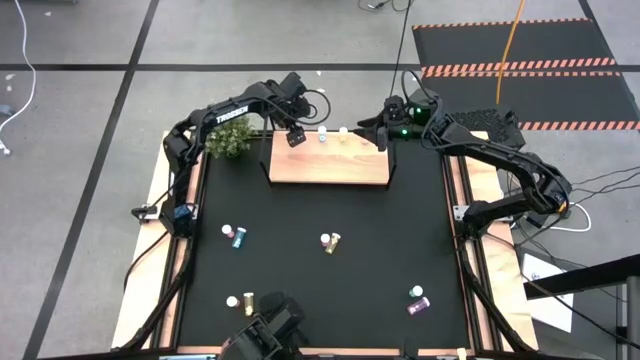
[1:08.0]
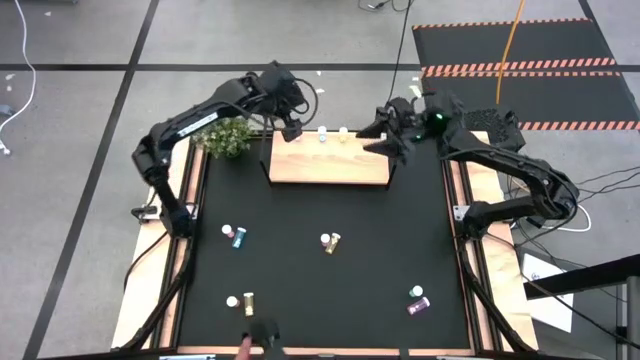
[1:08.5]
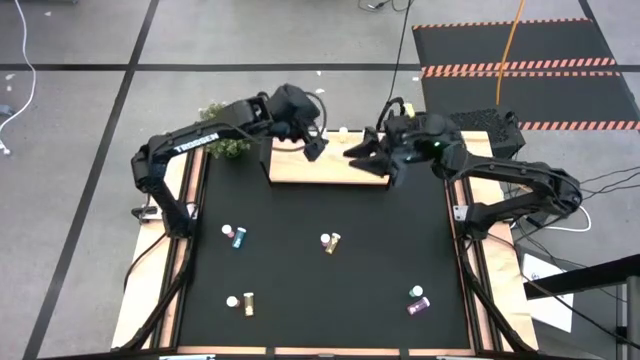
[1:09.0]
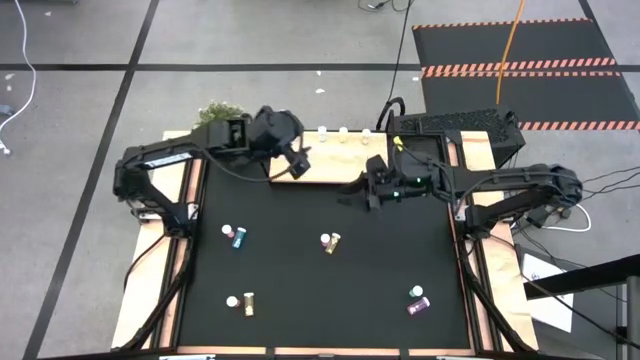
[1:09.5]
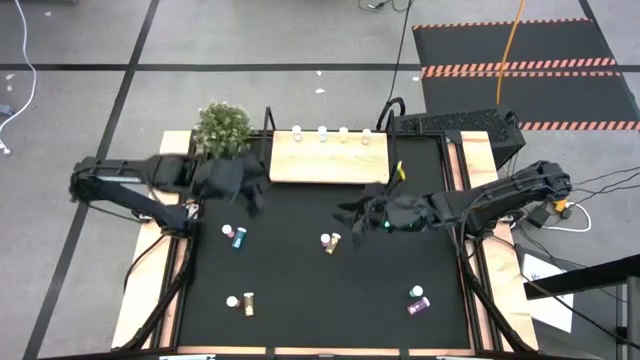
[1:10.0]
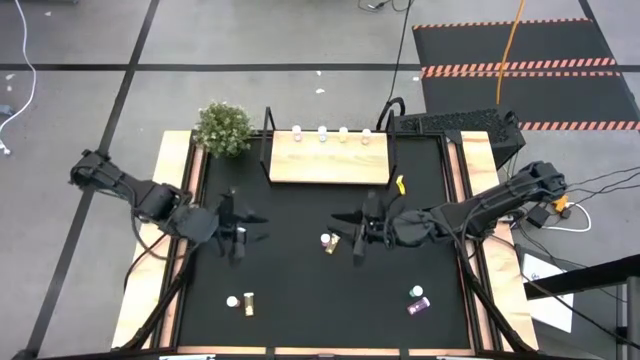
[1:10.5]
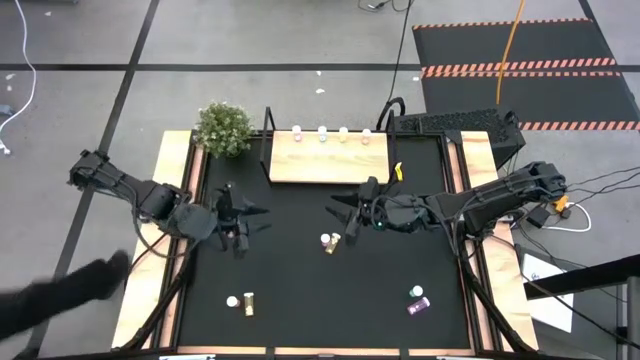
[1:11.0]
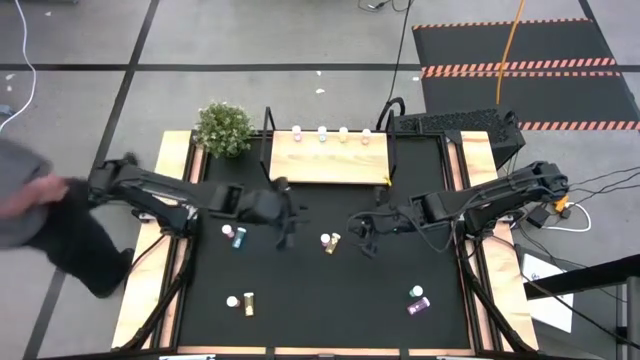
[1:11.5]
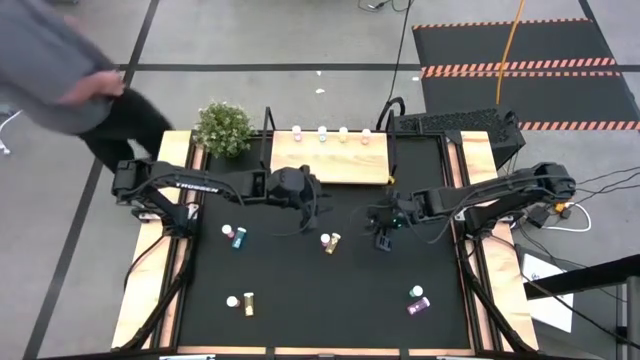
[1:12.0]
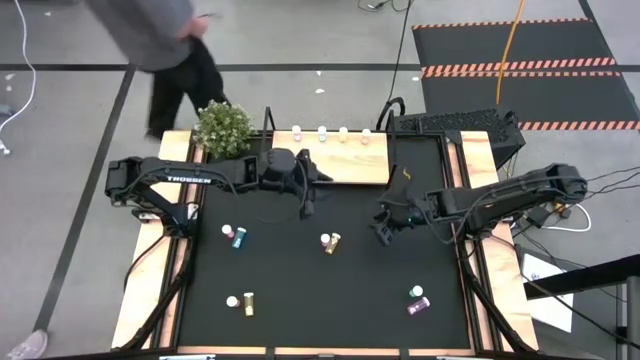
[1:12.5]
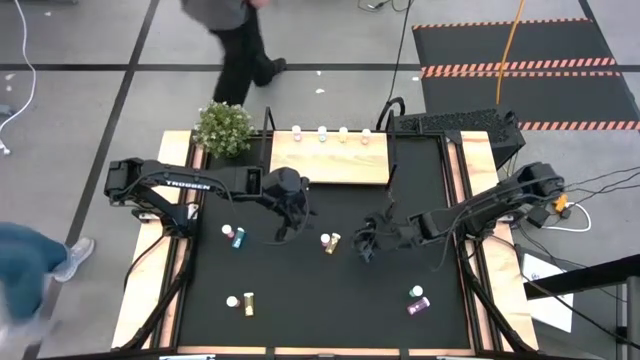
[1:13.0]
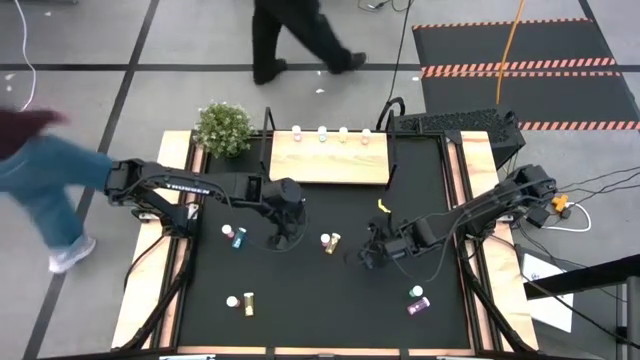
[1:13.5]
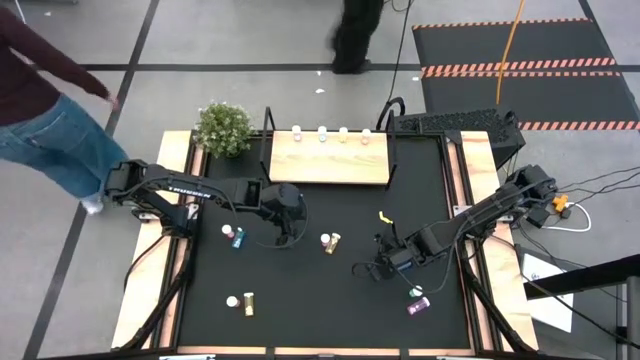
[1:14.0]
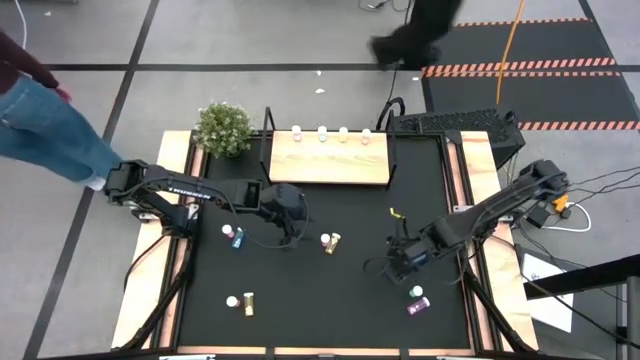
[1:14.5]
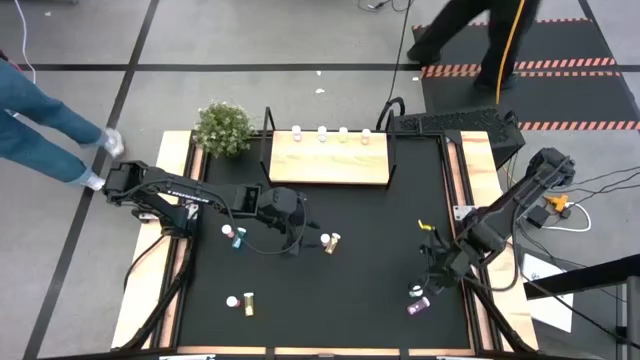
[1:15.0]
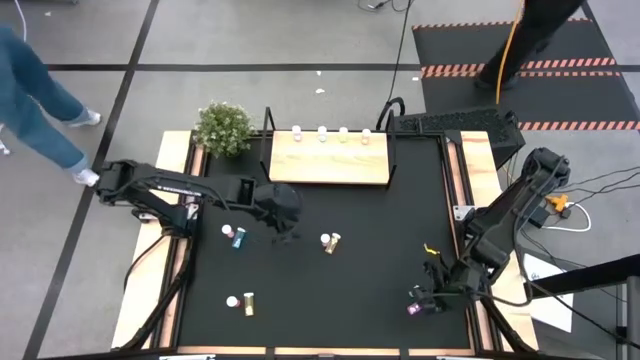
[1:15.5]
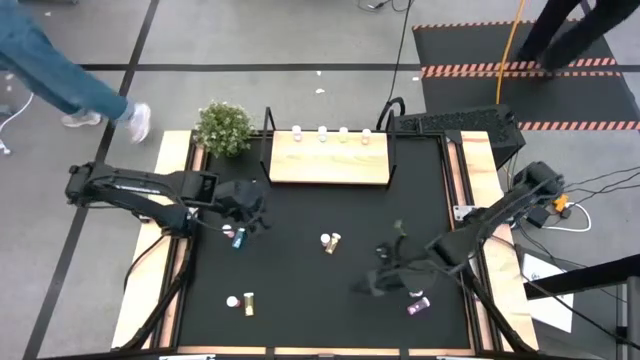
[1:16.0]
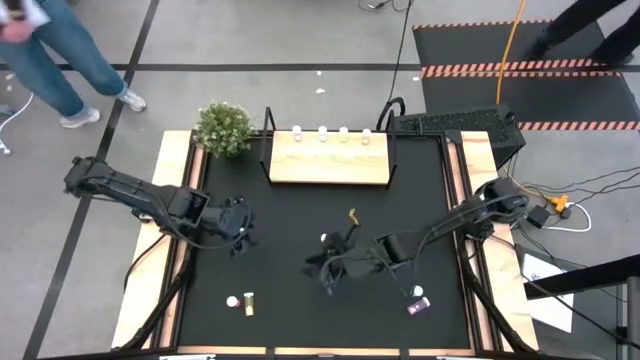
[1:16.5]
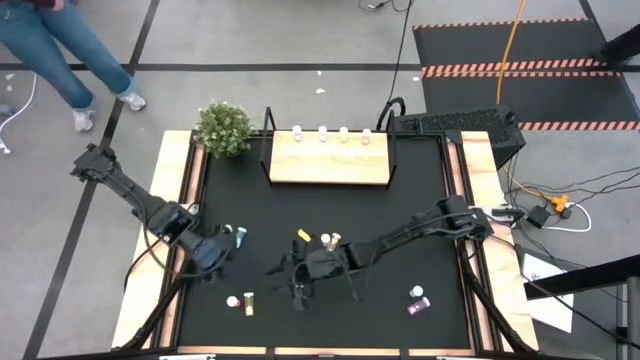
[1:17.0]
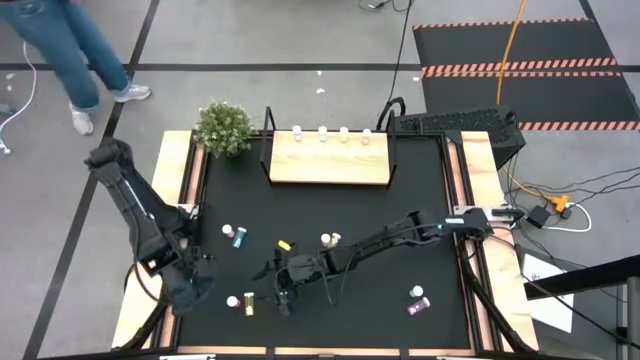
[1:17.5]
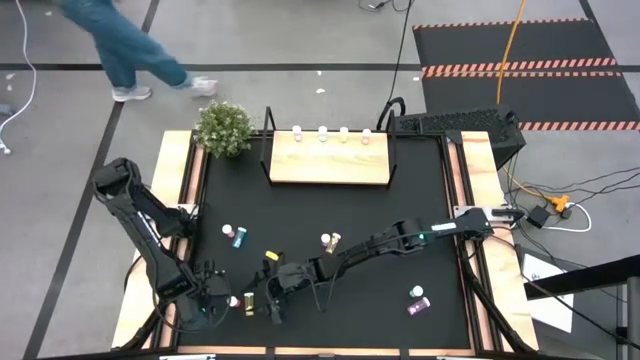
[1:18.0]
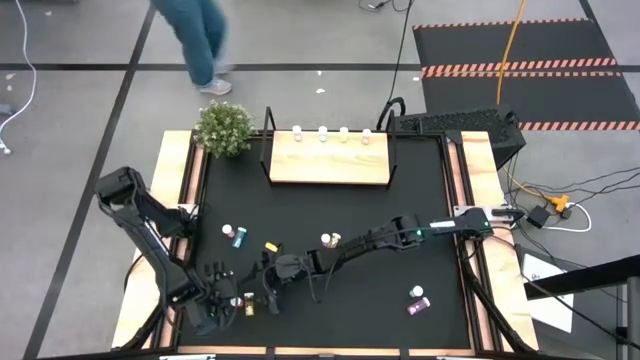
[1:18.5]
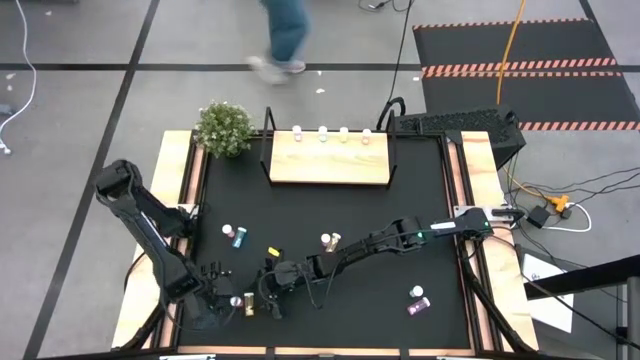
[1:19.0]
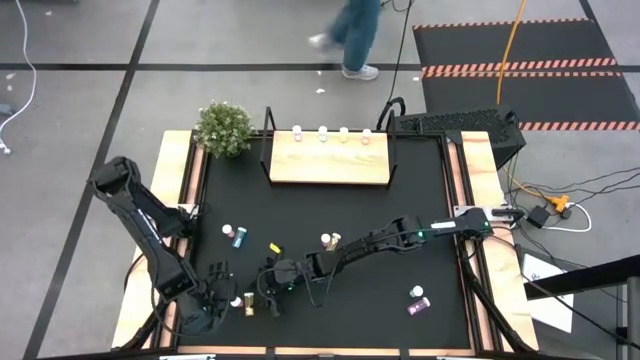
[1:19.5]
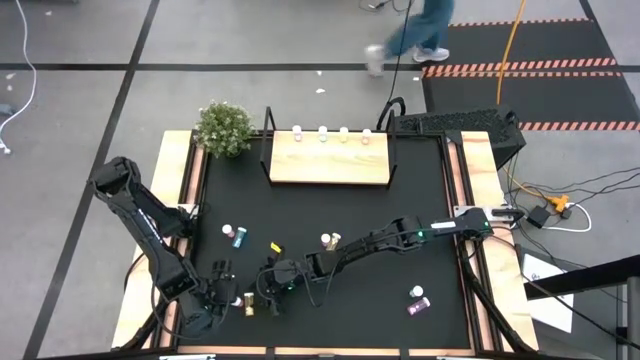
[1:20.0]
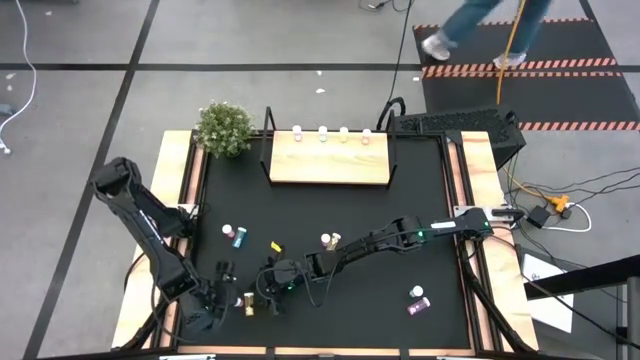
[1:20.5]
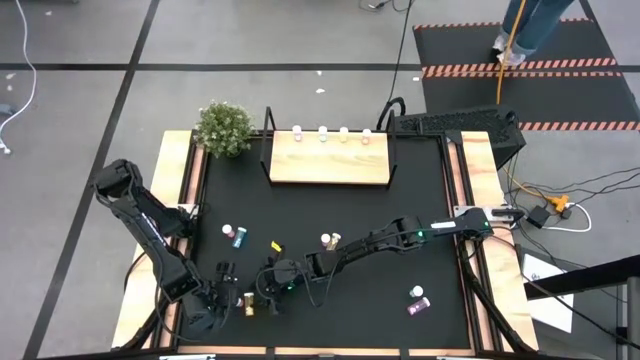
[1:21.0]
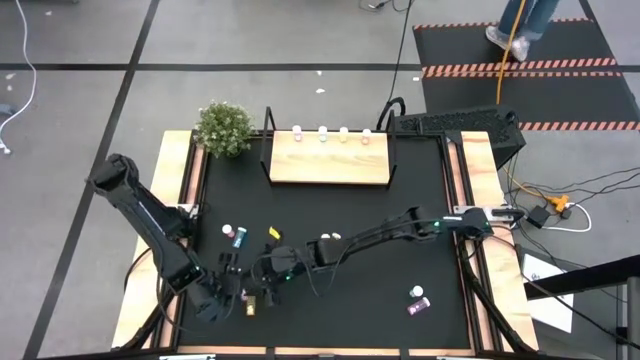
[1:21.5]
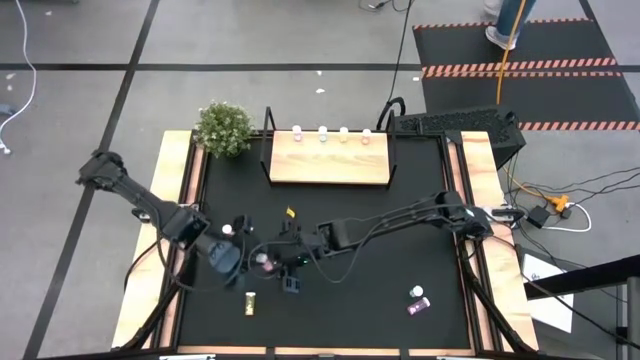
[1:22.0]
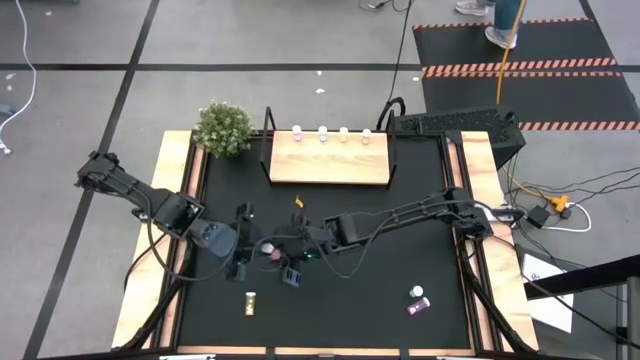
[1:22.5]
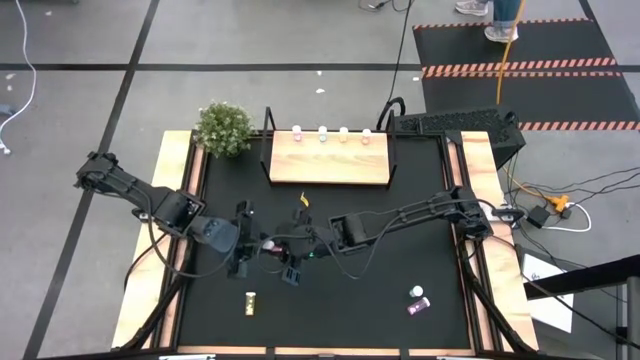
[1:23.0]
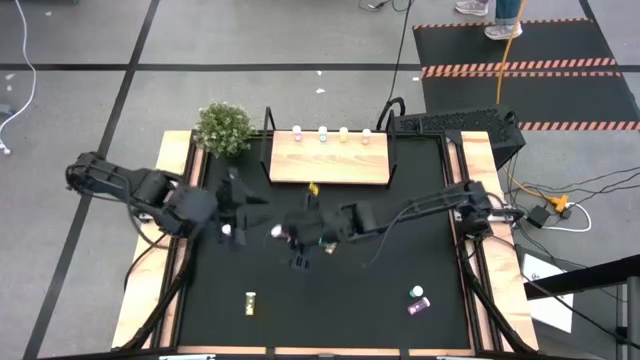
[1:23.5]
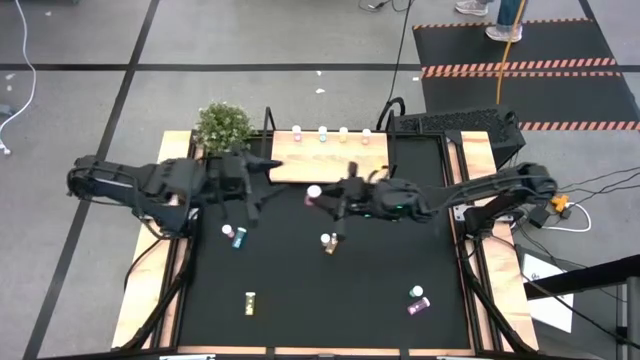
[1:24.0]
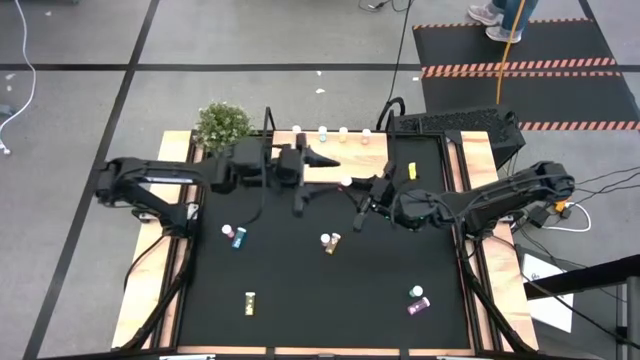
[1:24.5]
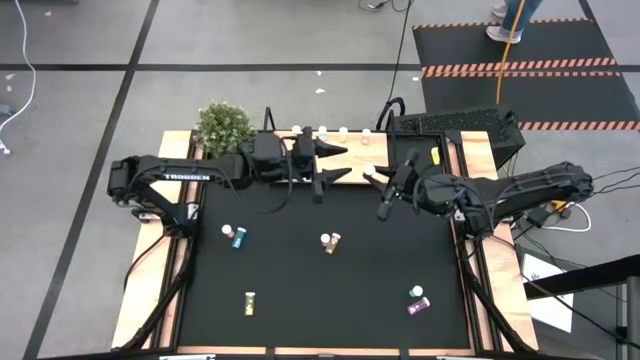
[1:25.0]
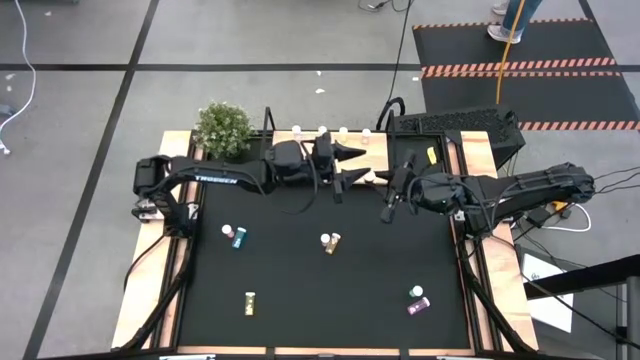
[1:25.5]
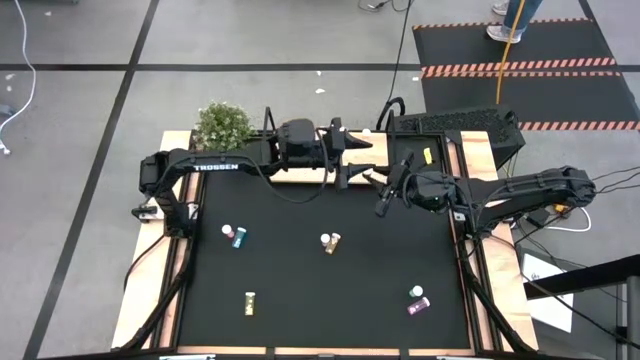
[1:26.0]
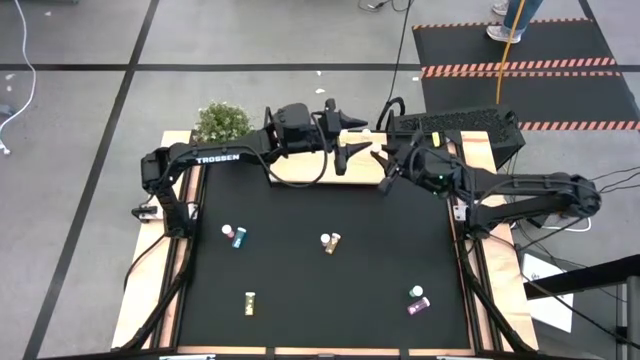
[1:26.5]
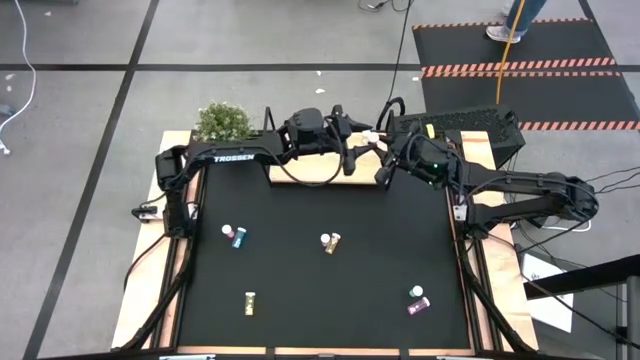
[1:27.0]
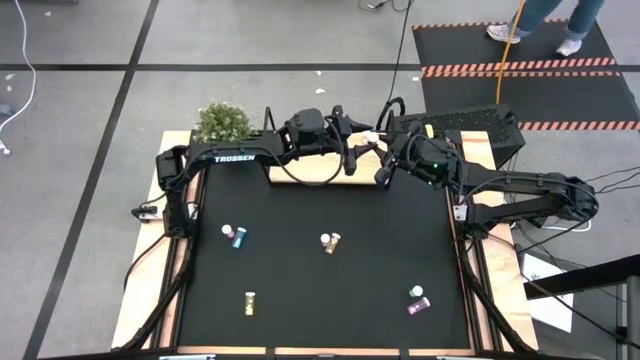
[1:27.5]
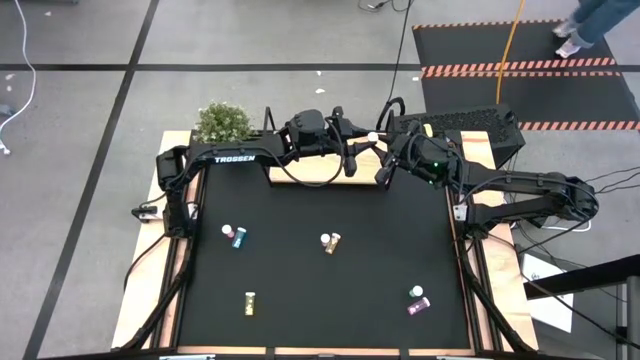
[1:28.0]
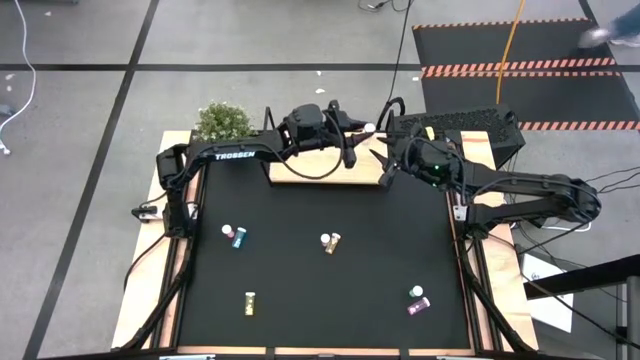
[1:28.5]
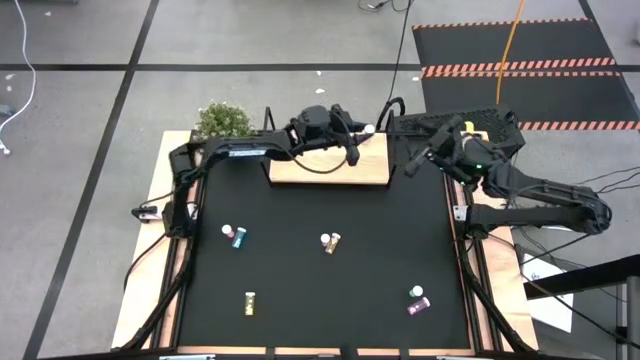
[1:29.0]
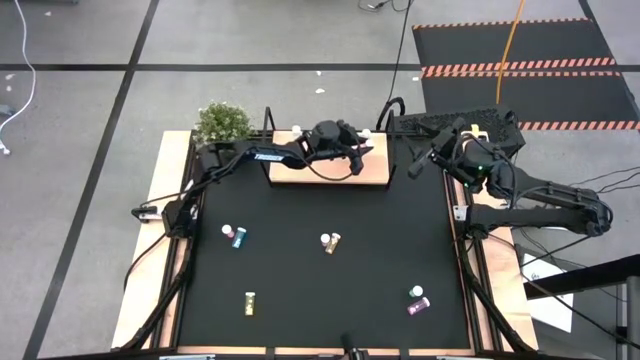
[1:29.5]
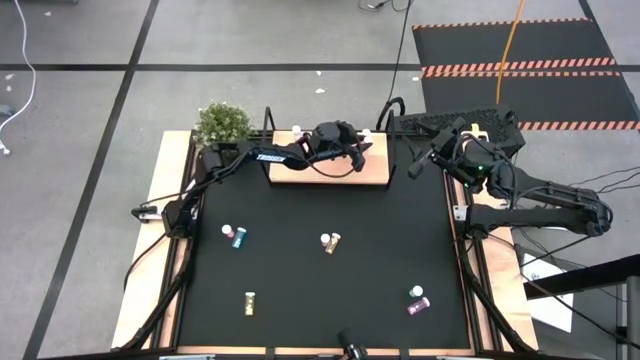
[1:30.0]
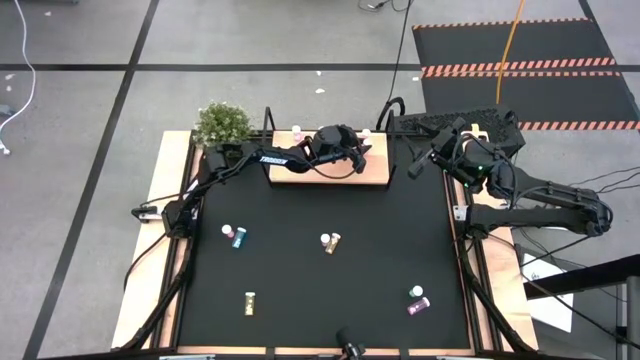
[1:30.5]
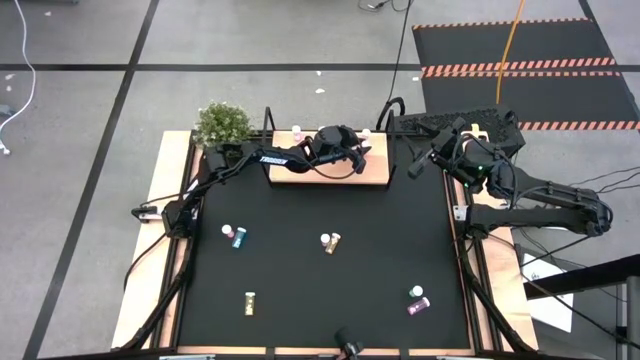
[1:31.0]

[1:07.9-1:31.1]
Task: Pick and place medicine bottles onto shelf by color
Put the bottom left pink pill bottle on the shelf aligned with the other pink pill bottle
